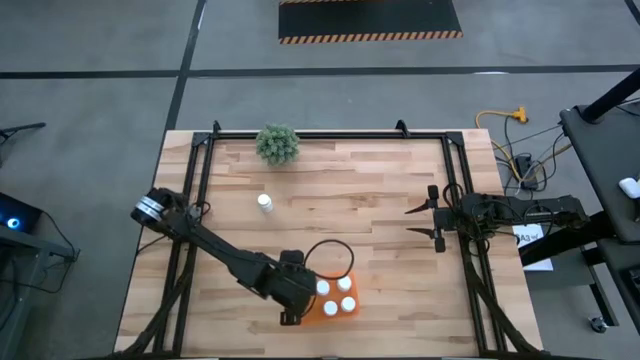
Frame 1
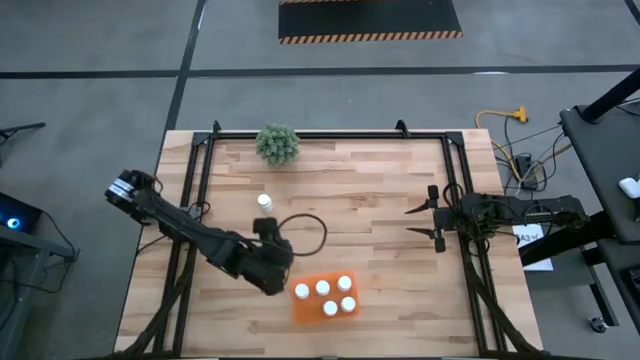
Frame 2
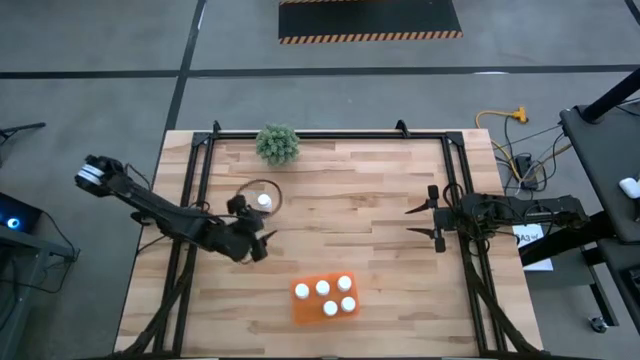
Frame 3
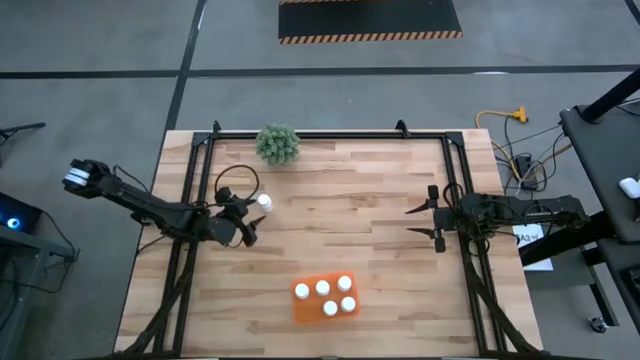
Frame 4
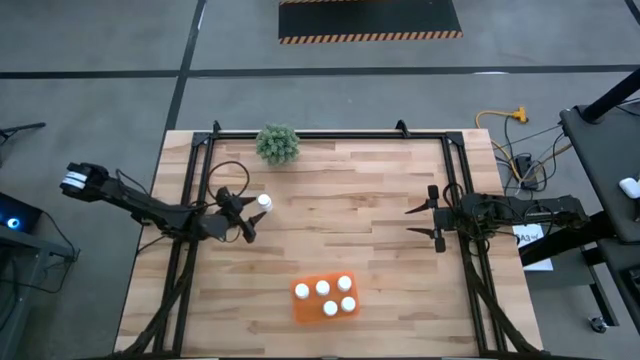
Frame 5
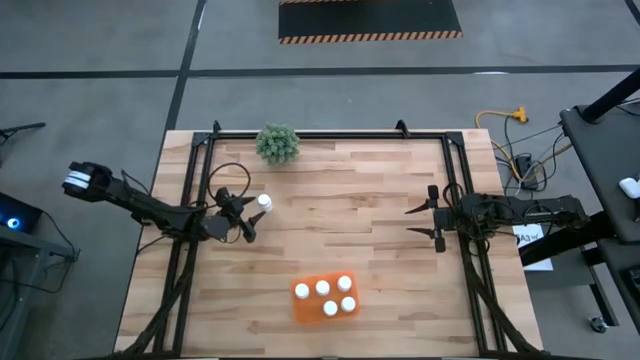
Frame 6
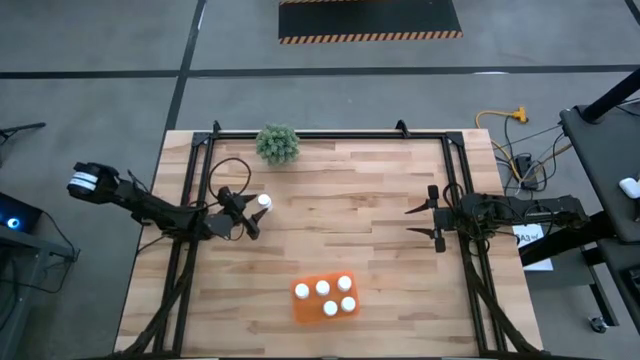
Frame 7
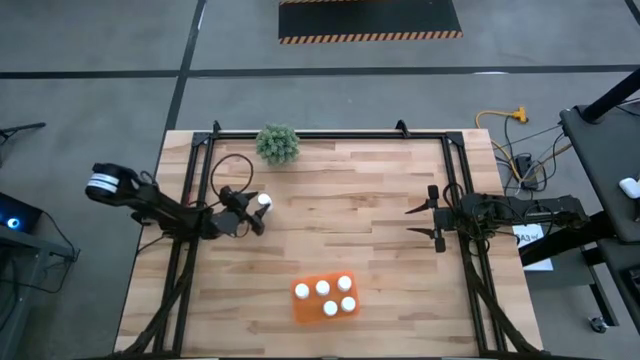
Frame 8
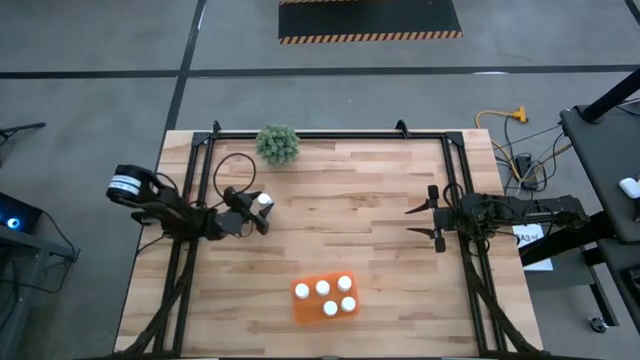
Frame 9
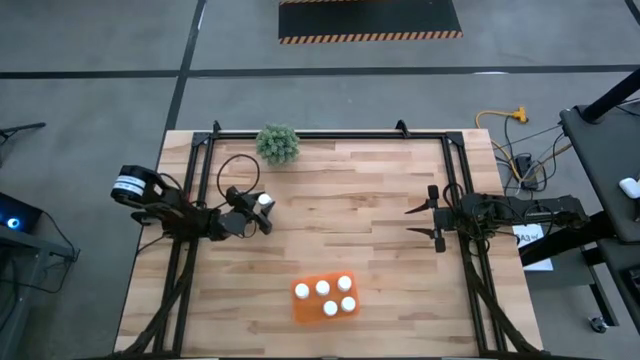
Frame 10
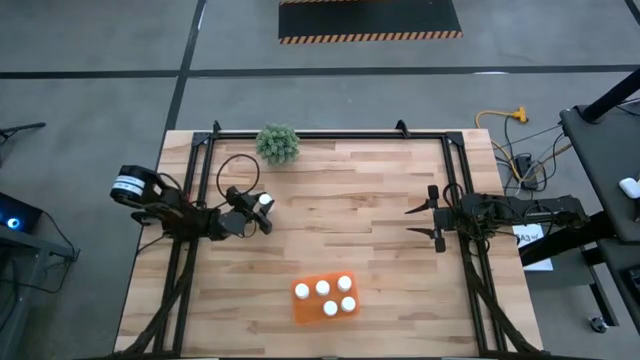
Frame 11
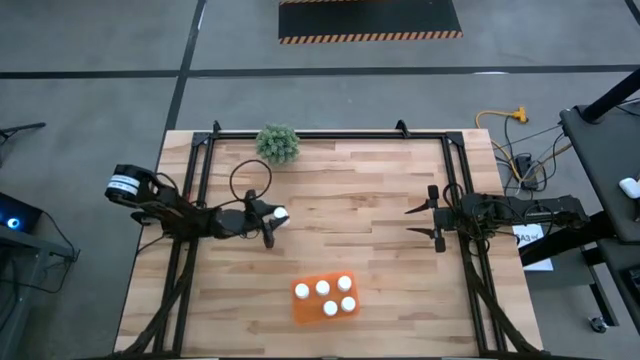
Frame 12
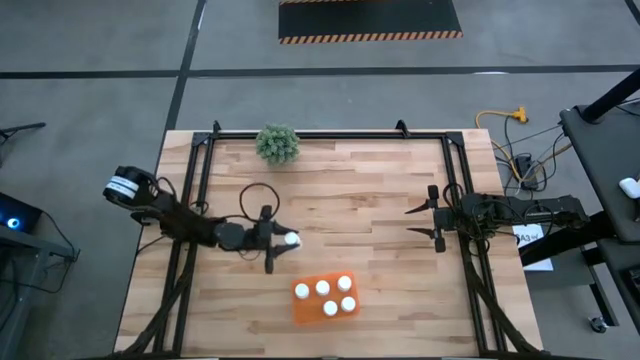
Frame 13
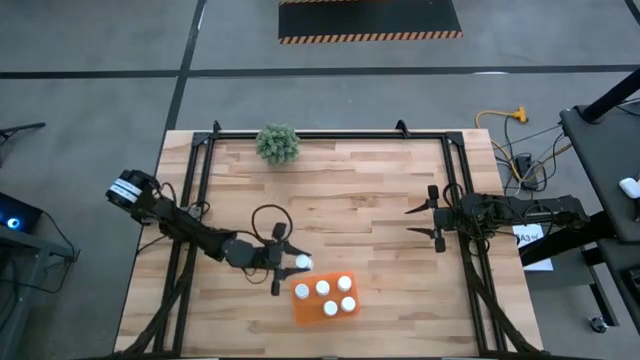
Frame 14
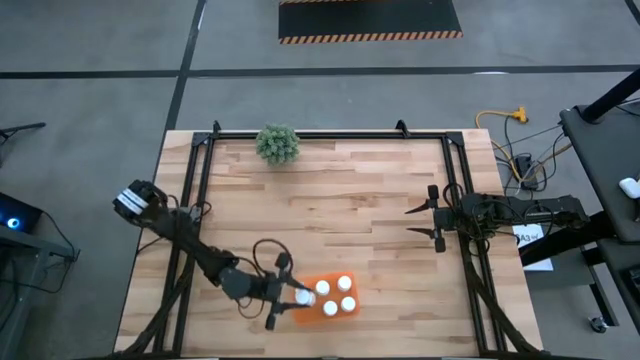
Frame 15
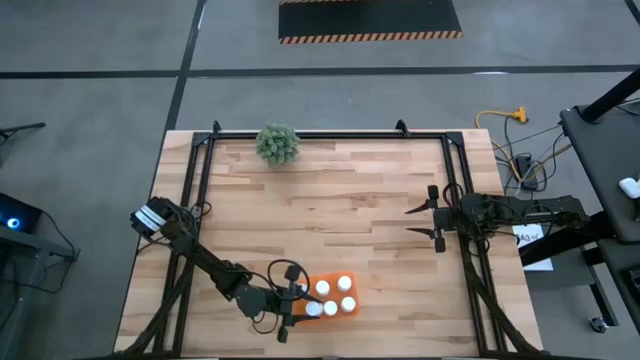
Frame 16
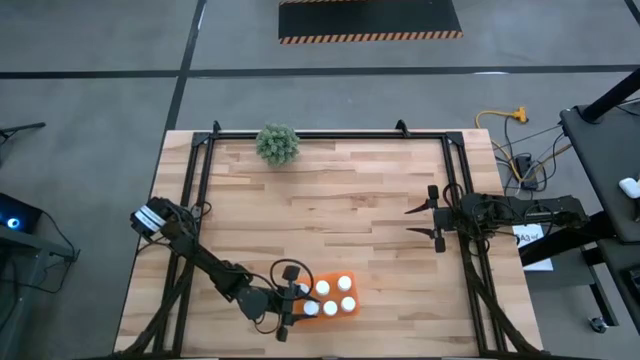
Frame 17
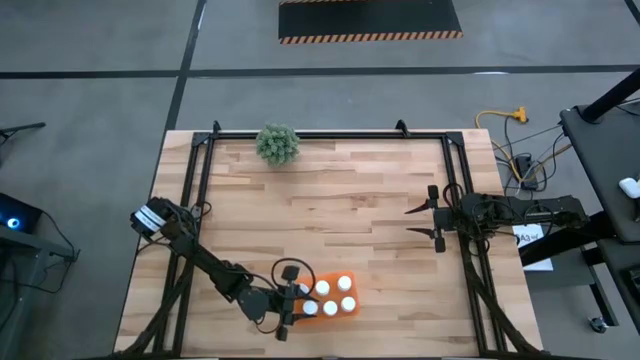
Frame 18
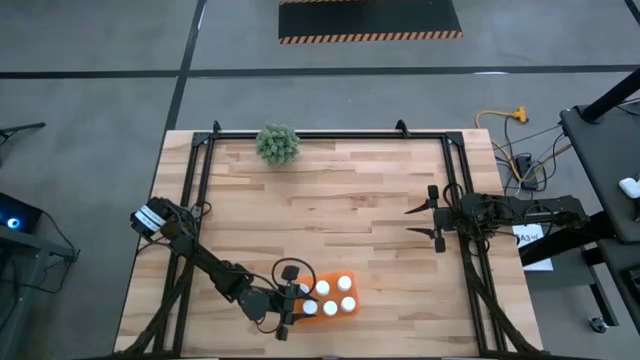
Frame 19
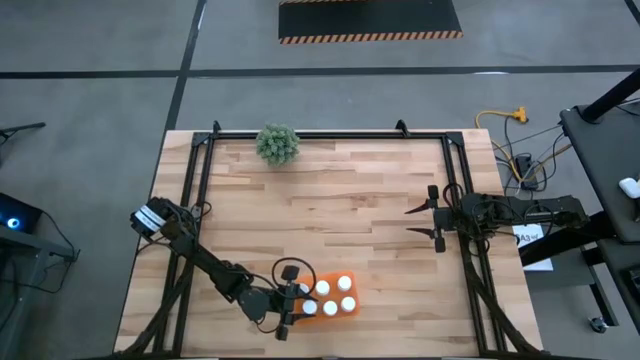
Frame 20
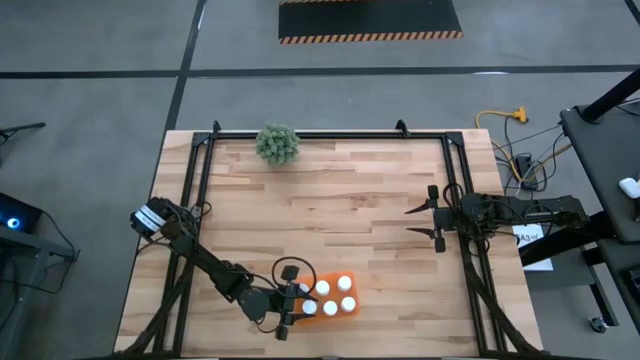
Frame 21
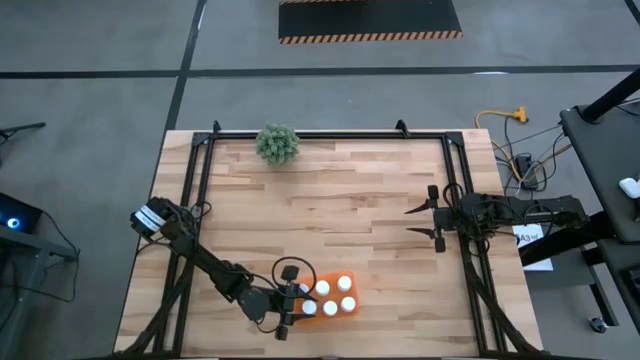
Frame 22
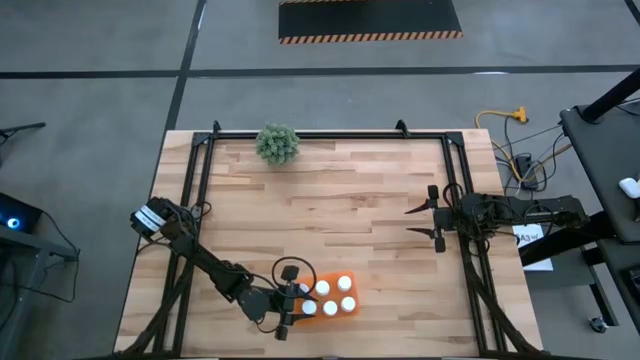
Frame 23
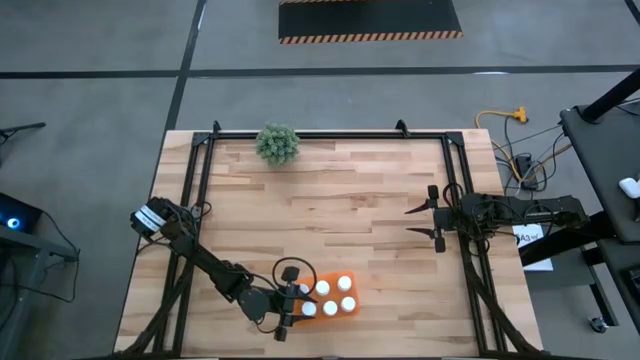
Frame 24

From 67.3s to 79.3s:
Task: Pick and place pill bottles into a basket
Put the pill bottle into the bin

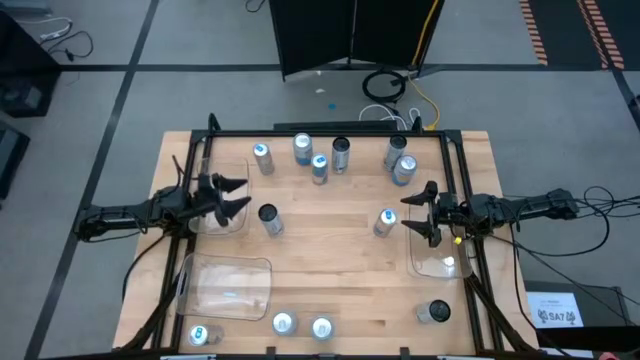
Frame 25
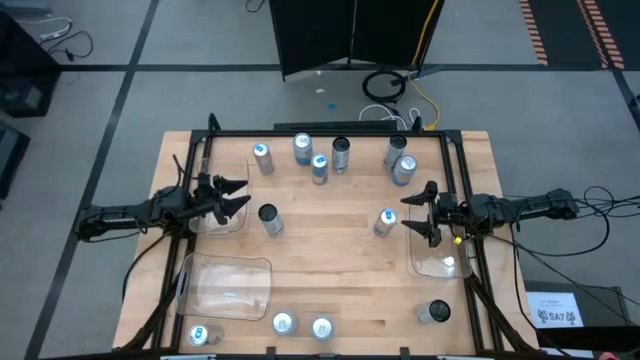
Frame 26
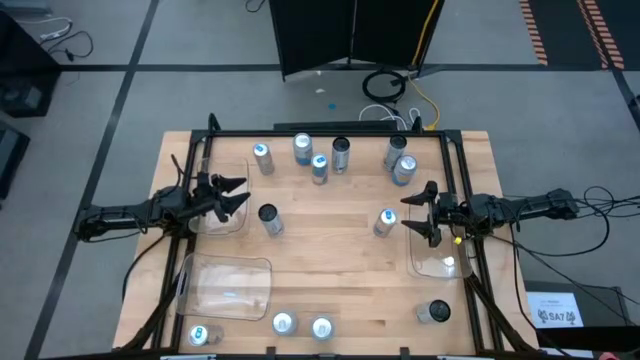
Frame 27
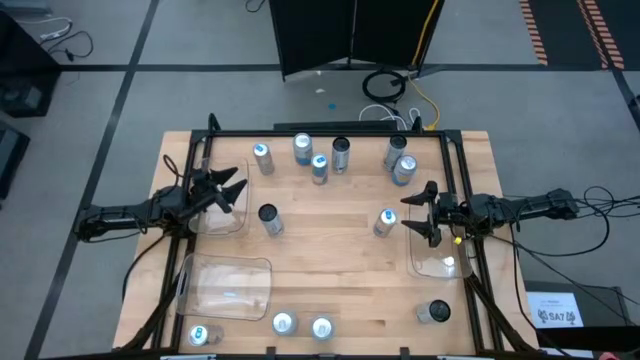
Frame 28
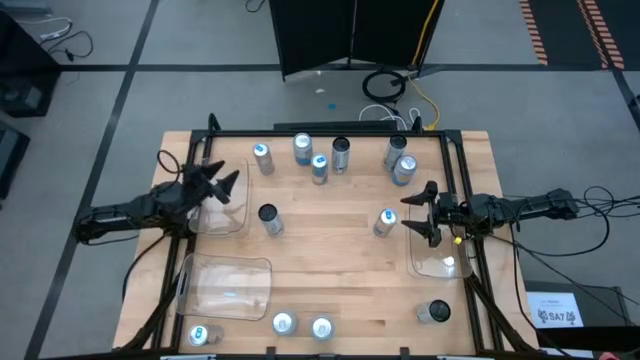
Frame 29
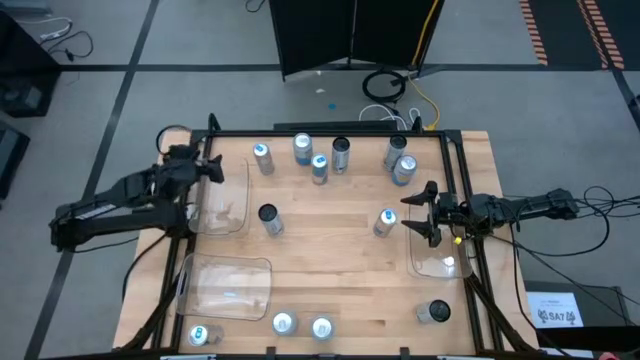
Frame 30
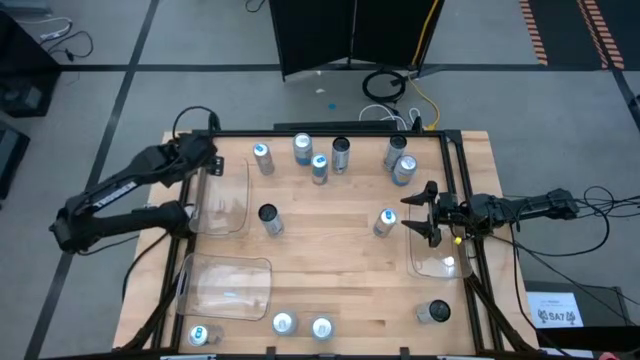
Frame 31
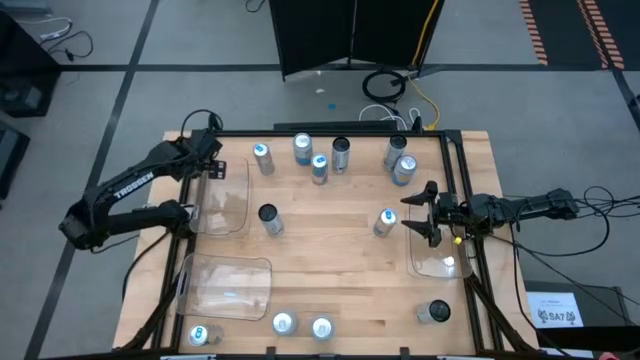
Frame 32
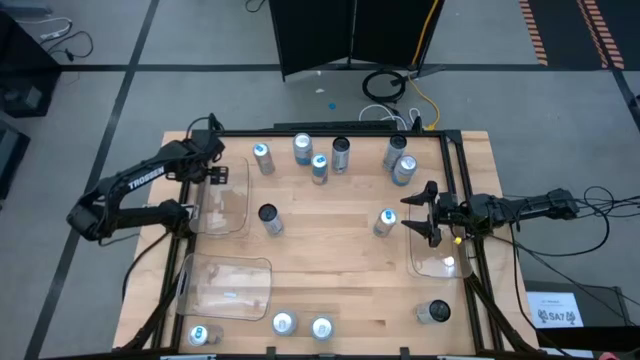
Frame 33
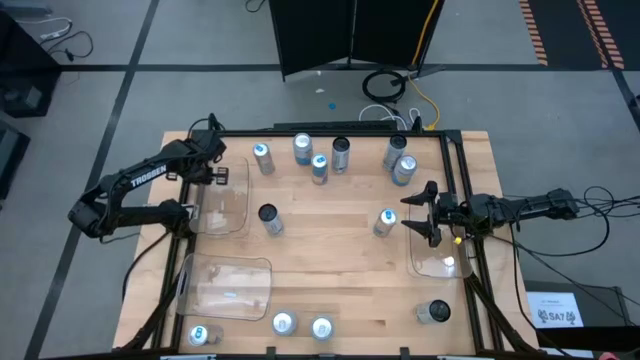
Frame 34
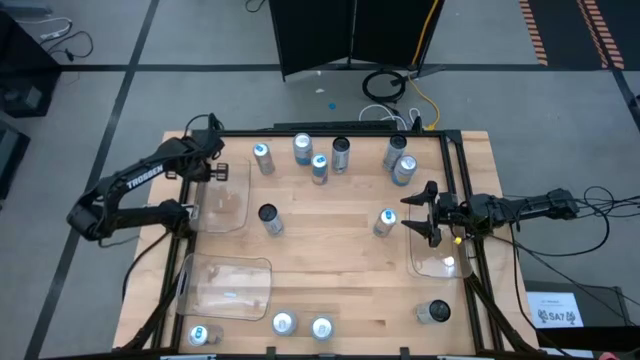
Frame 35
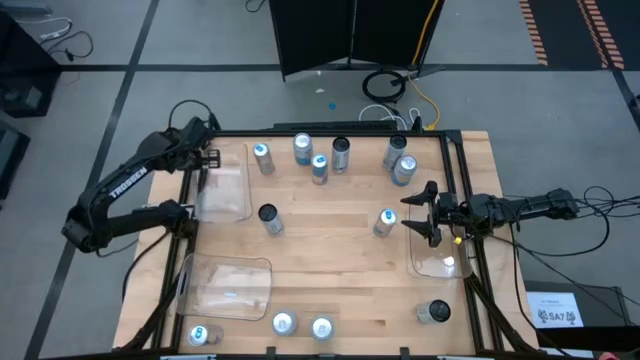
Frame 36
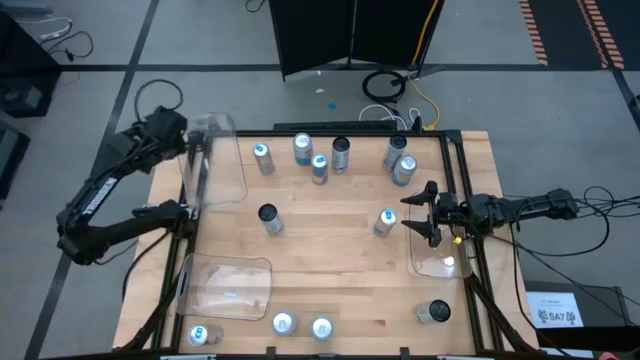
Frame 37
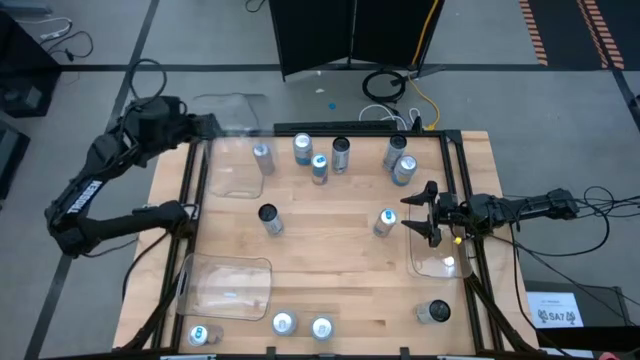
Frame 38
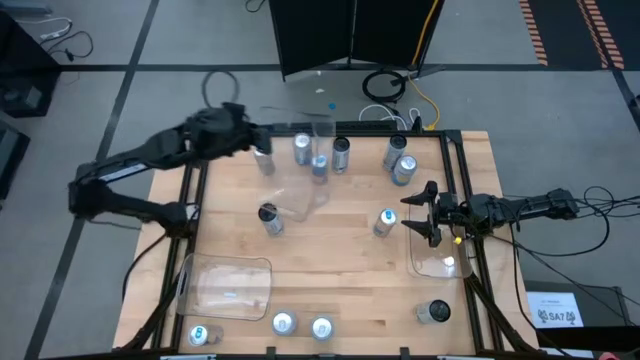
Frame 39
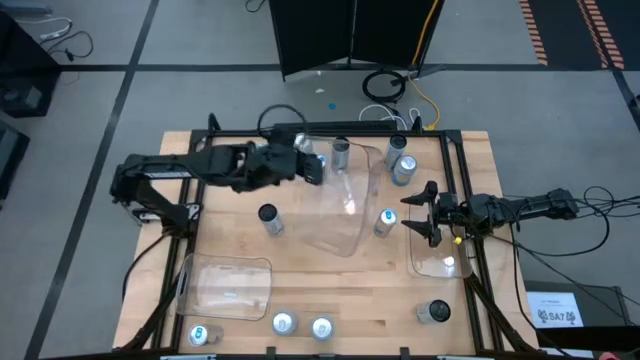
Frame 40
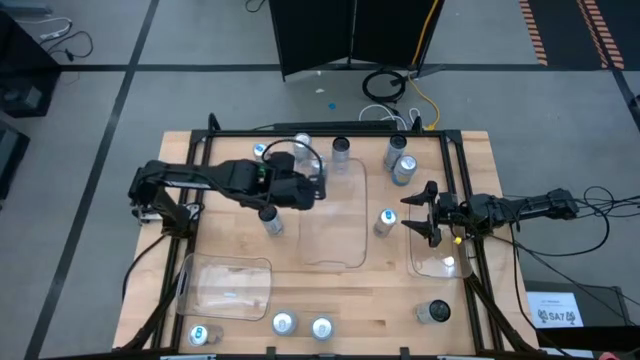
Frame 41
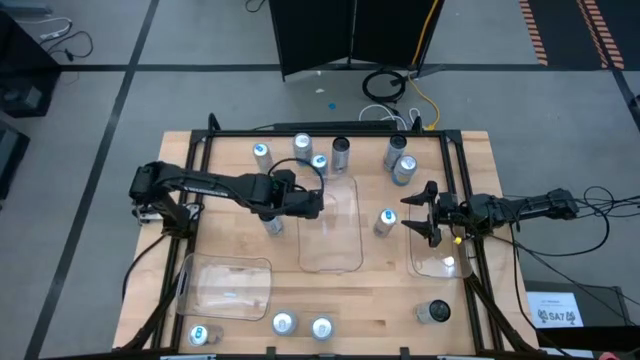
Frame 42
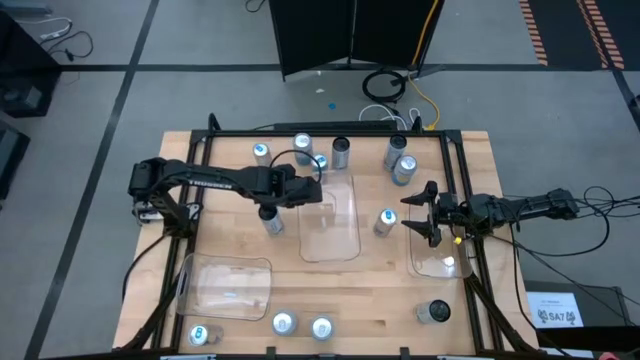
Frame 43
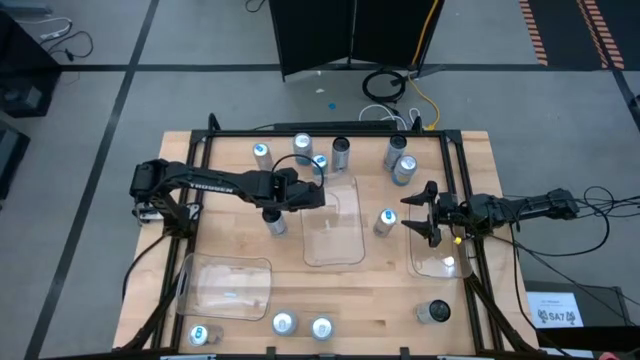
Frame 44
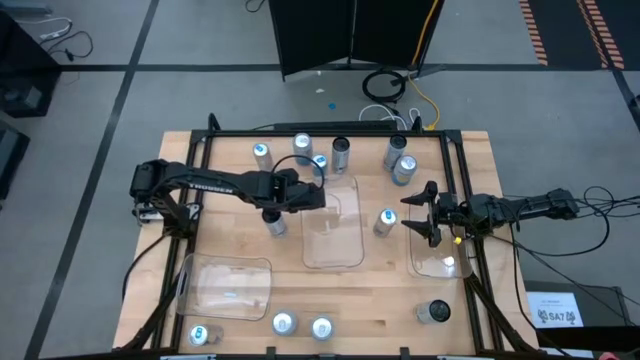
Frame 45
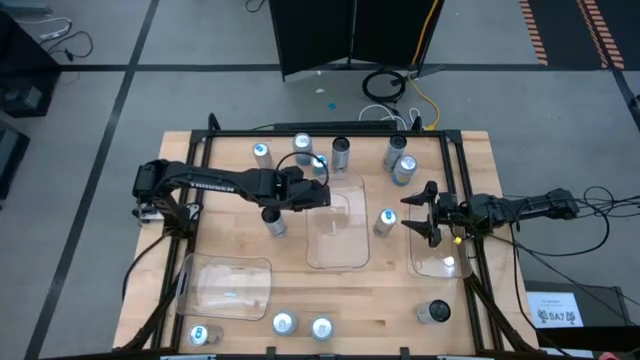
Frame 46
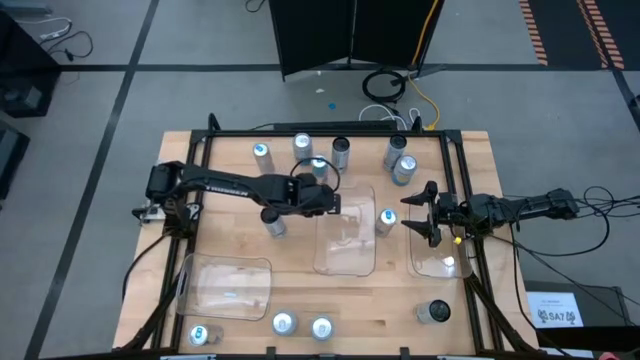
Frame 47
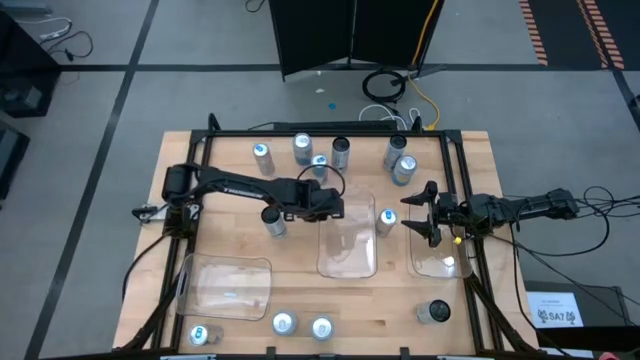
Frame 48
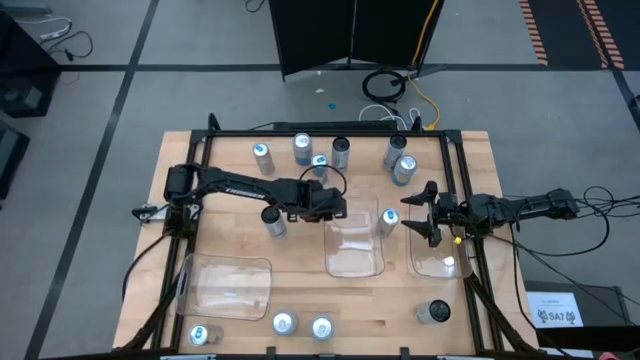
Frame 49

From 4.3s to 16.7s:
Task: Sort soda cans
Move the top transparent bin to the center of the table
